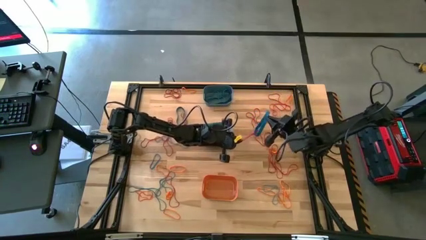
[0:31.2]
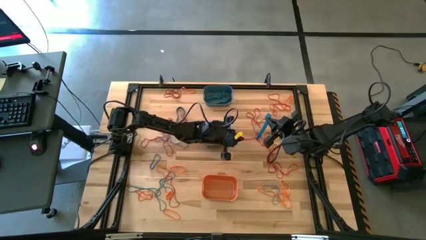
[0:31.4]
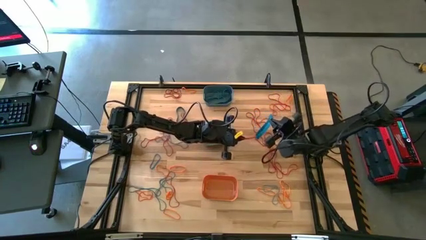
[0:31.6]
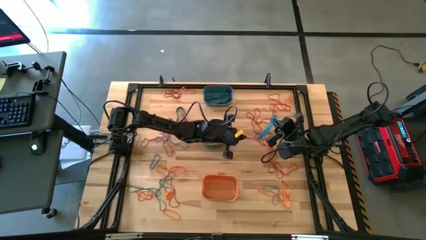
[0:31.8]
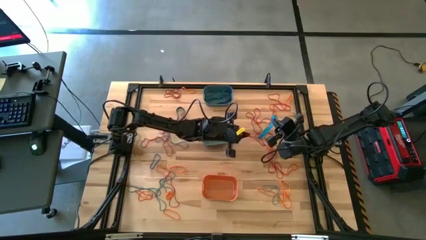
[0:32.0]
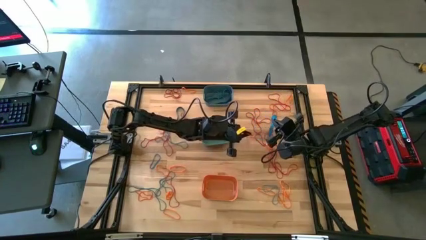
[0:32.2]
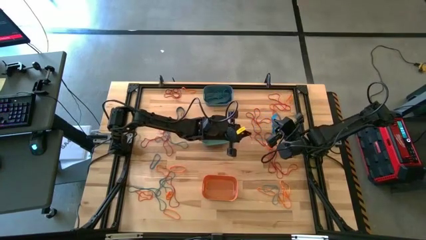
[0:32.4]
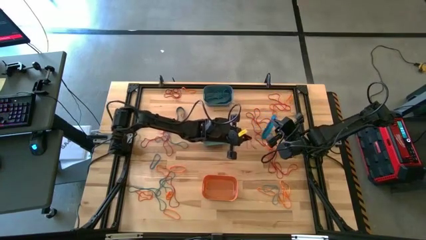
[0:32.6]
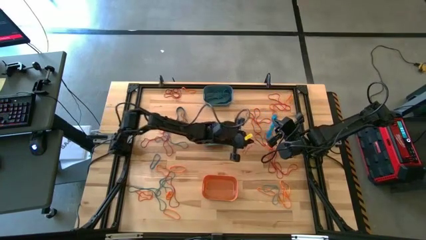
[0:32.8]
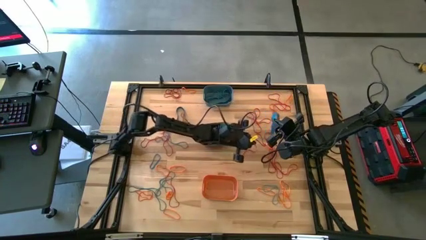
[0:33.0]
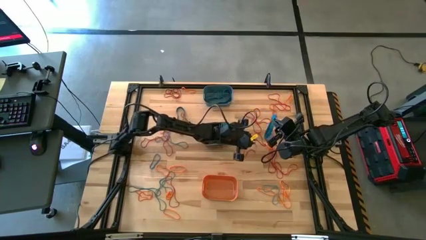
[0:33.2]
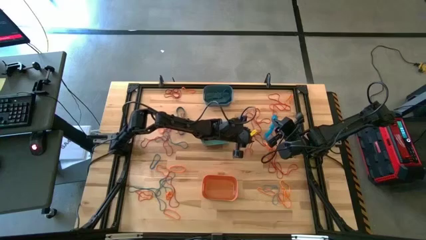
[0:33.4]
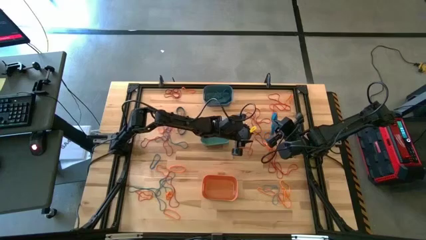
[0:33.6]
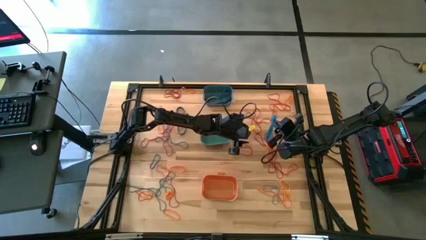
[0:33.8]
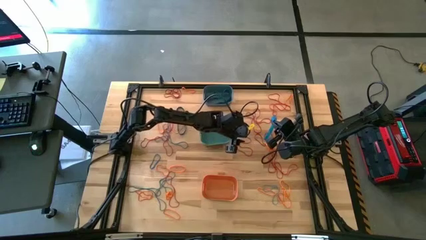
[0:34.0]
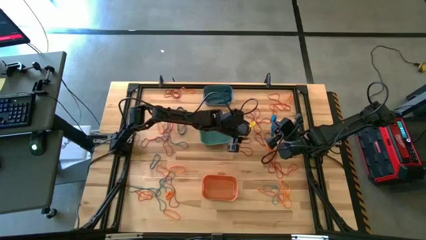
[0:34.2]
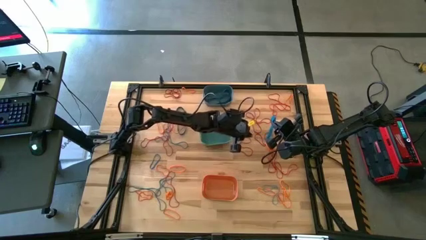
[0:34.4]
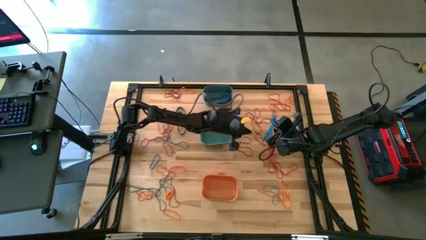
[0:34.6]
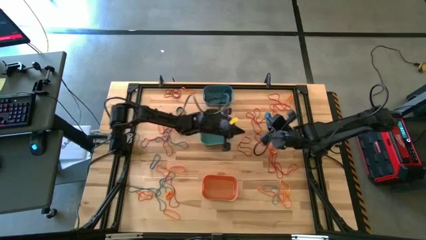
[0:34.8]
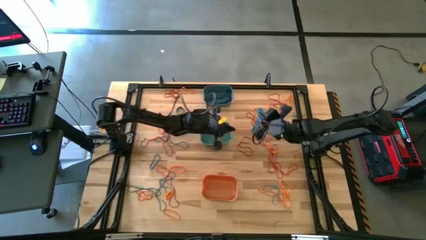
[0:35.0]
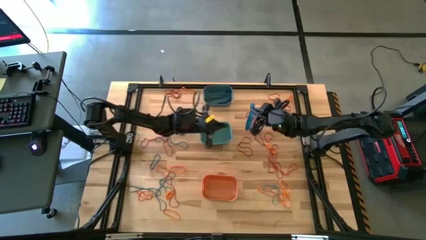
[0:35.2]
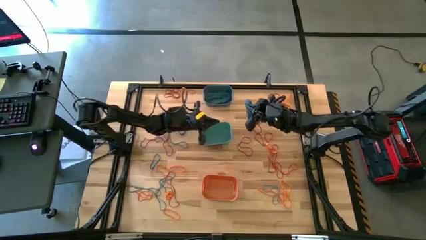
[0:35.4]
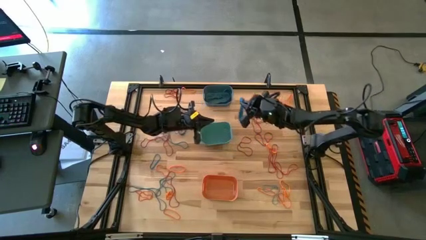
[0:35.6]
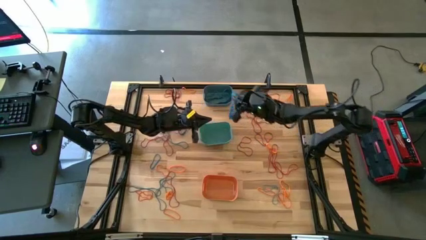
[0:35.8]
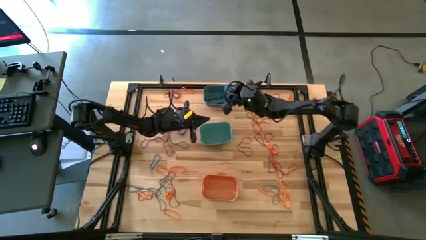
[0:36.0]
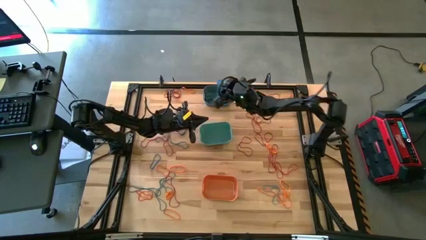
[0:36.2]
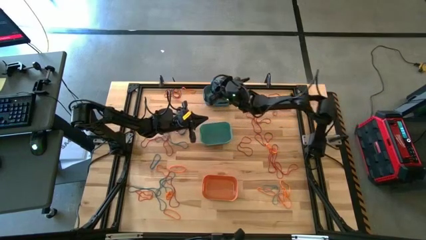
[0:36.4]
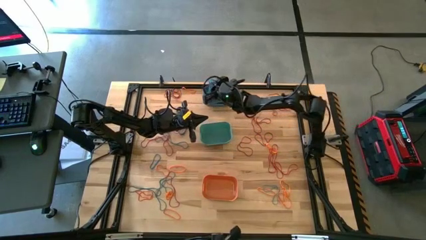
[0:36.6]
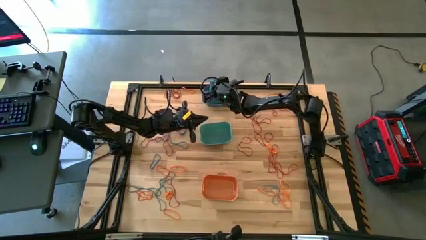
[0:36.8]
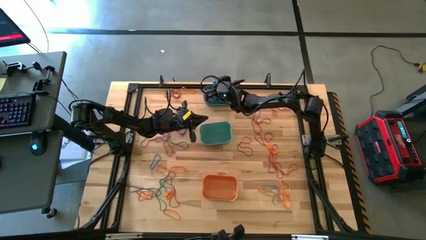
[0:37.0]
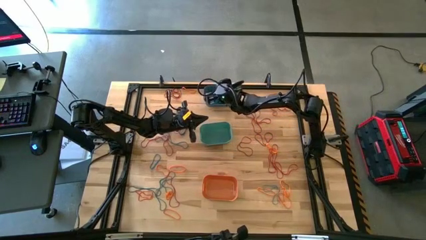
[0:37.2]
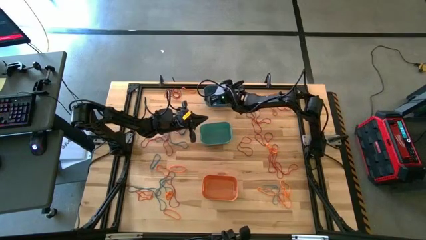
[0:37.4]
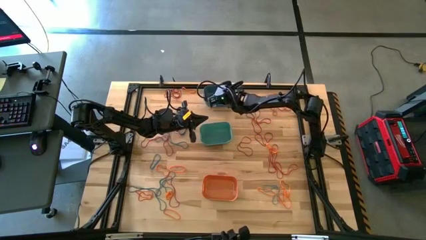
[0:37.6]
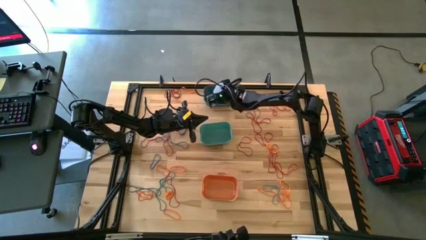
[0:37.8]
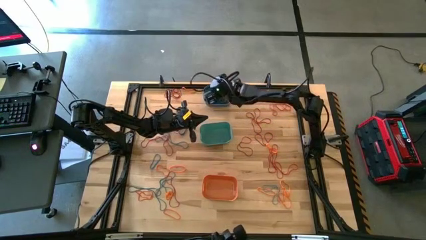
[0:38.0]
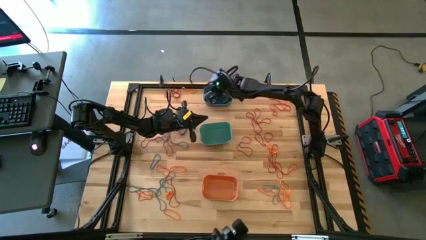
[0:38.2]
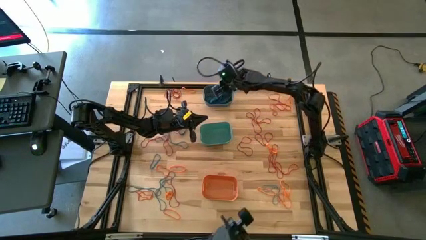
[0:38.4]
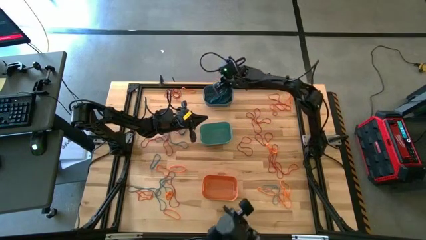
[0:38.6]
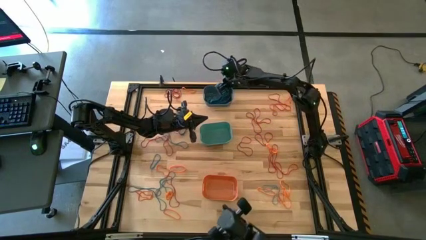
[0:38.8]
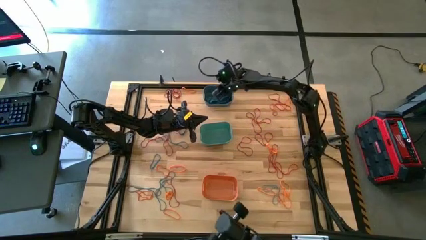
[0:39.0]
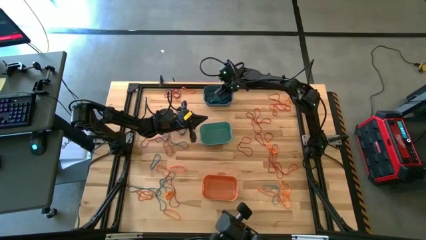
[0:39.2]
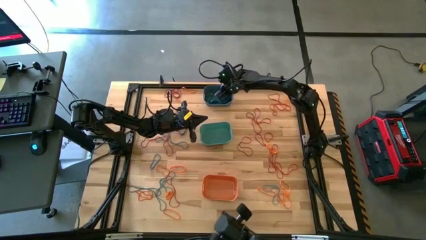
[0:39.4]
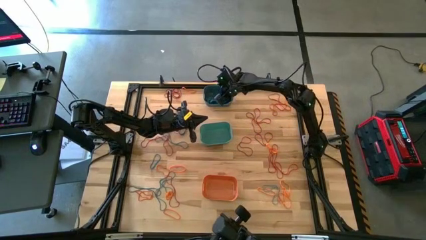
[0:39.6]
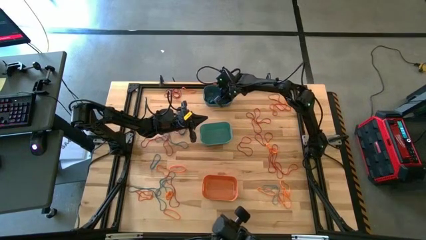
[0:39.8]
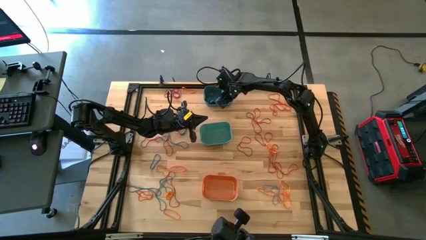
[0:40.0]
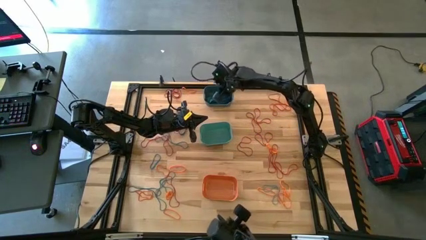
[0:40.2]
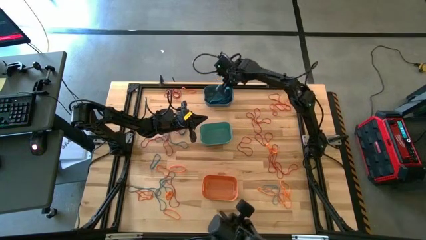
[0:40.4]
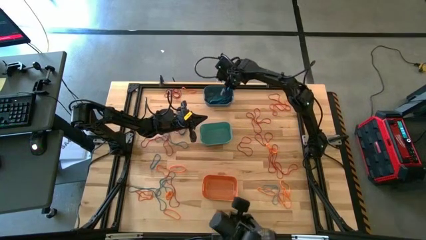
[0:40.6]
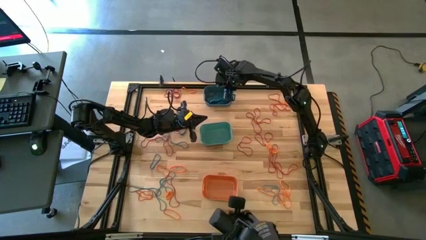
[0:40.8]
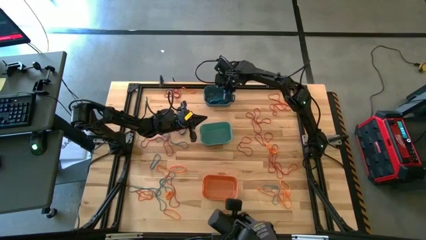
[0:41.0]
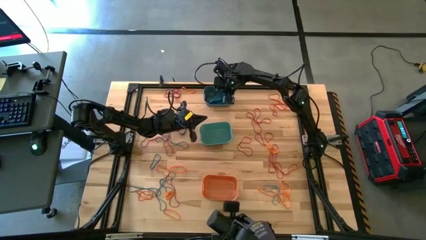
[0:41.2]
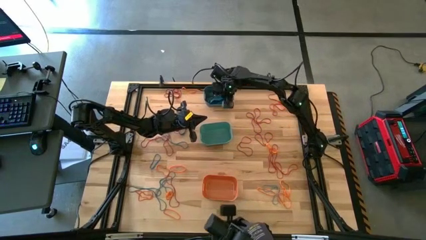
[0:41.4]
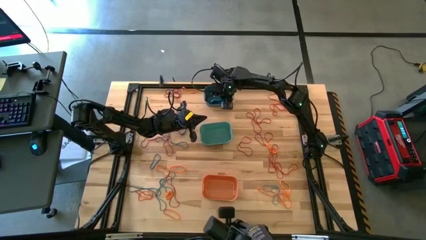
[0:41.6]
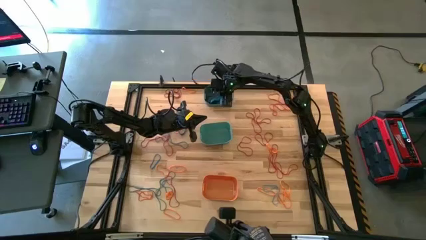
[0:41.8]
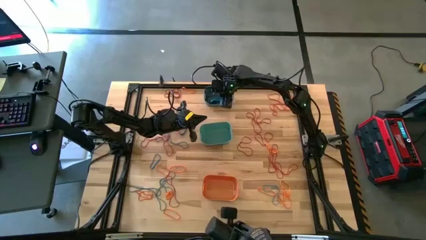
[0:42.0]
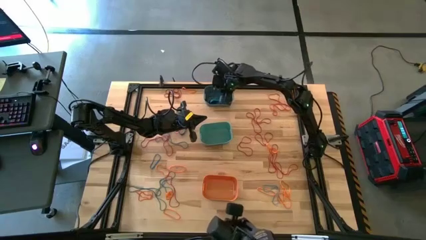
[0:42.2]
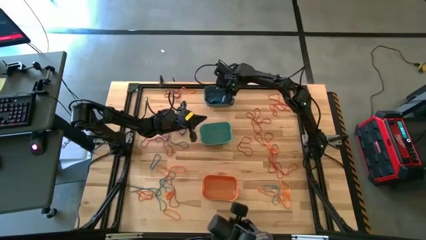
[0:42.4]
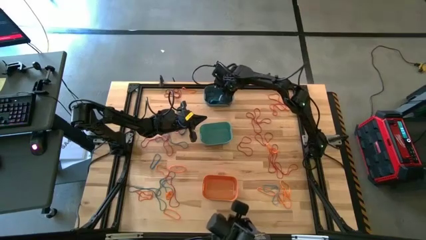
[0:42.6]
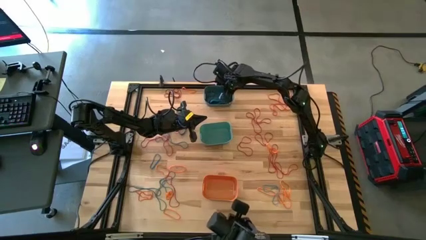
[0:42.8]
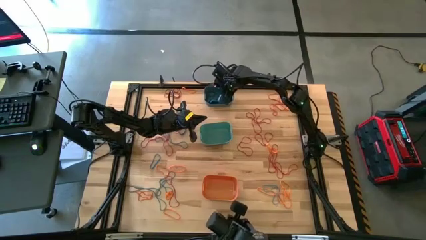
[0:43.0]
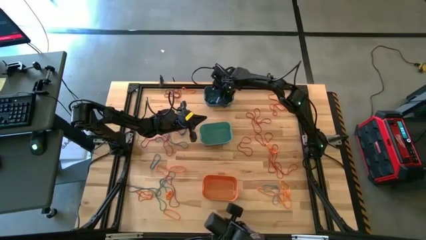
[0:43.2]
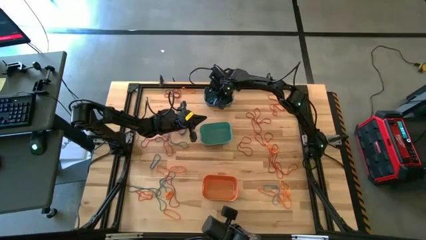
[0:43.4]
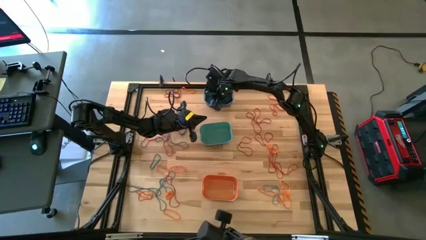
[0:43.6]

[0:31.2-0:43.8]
Task: Sort rubber bands into baskets
Put the blue rubber band into the blue bin

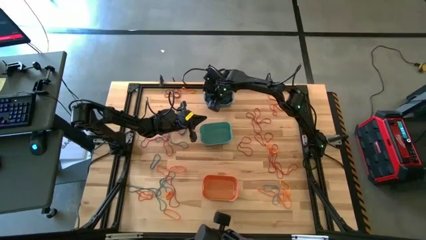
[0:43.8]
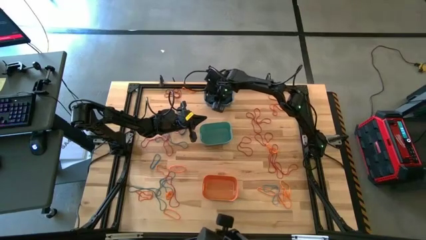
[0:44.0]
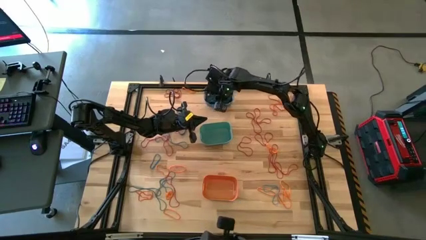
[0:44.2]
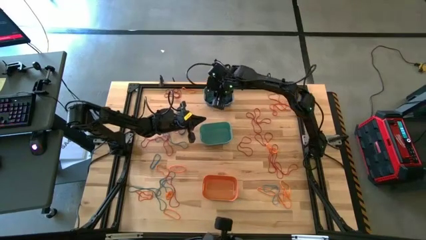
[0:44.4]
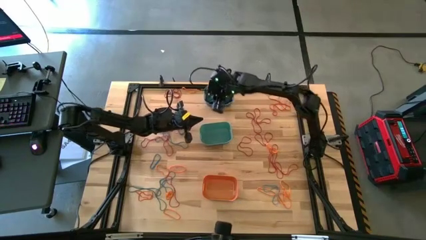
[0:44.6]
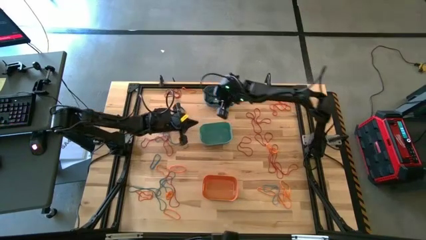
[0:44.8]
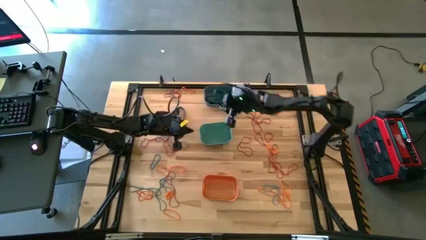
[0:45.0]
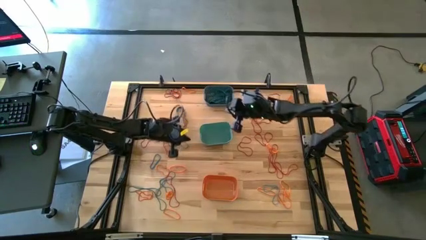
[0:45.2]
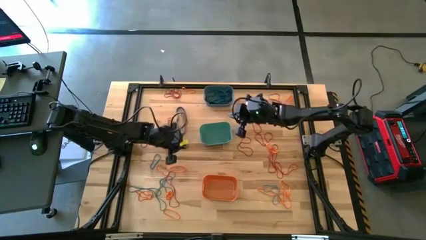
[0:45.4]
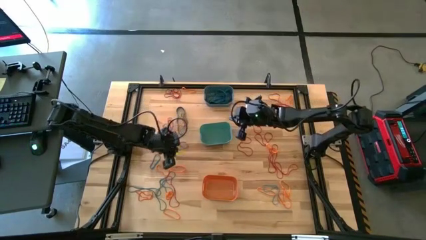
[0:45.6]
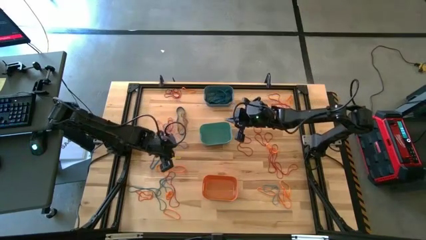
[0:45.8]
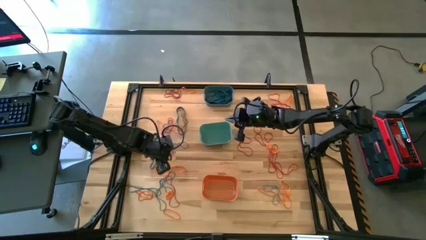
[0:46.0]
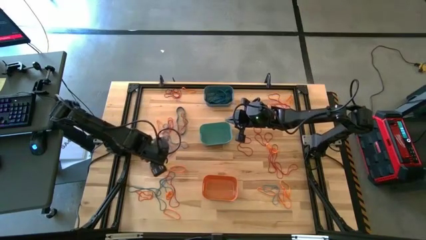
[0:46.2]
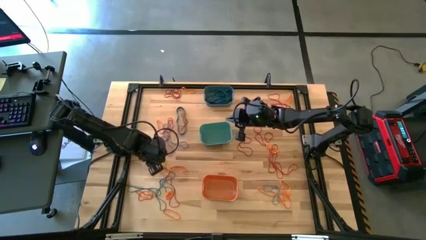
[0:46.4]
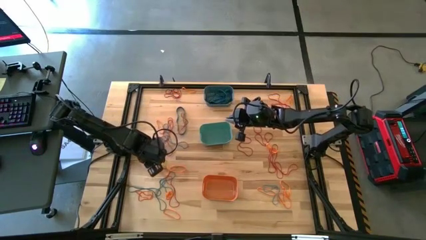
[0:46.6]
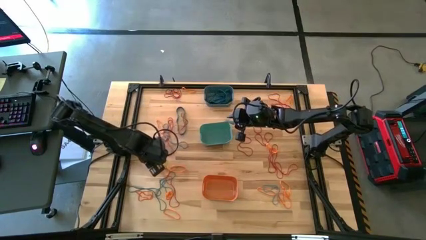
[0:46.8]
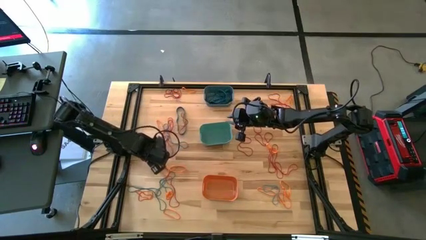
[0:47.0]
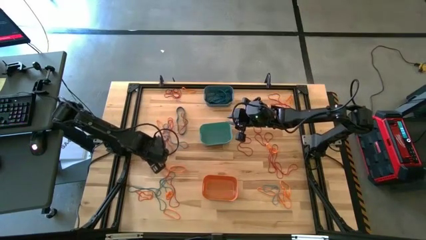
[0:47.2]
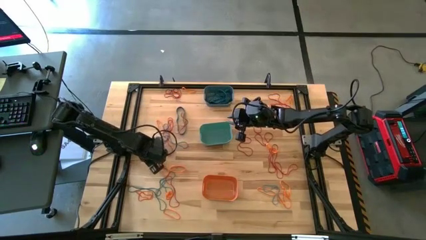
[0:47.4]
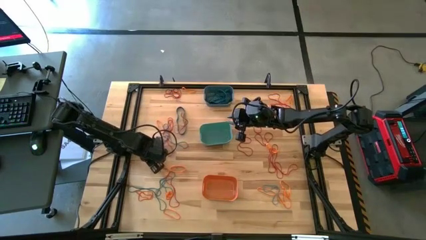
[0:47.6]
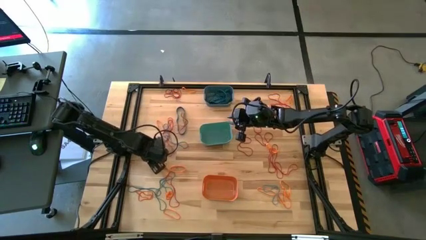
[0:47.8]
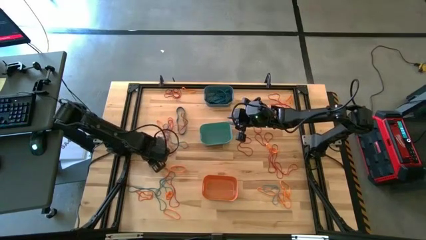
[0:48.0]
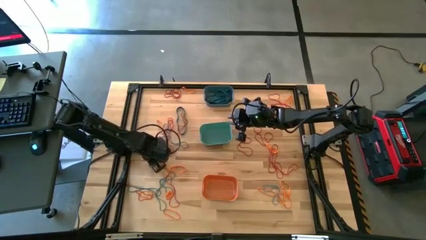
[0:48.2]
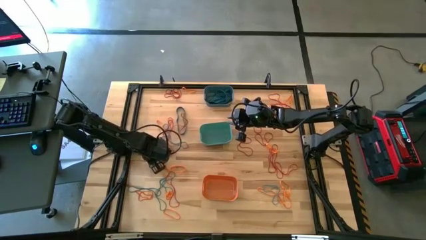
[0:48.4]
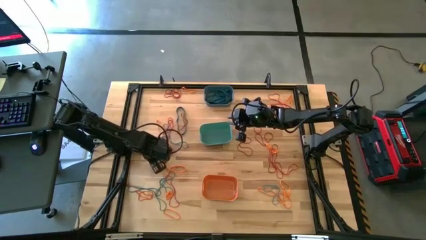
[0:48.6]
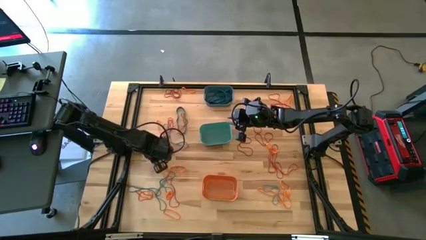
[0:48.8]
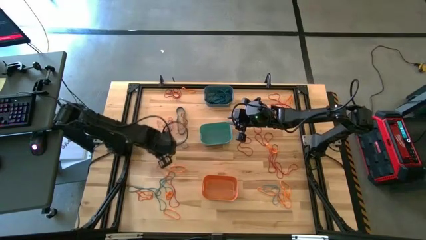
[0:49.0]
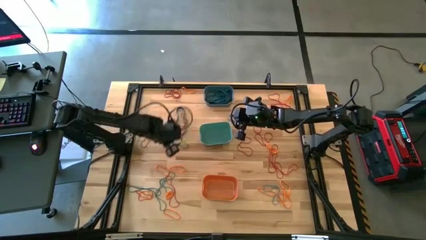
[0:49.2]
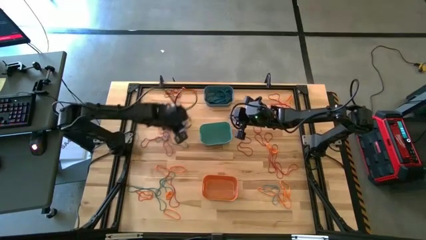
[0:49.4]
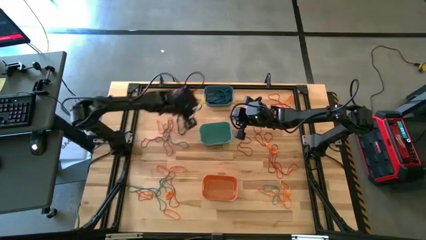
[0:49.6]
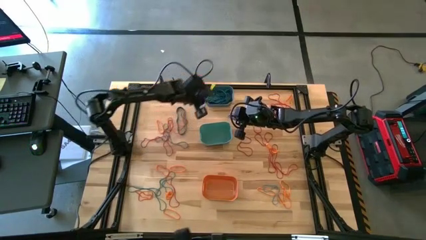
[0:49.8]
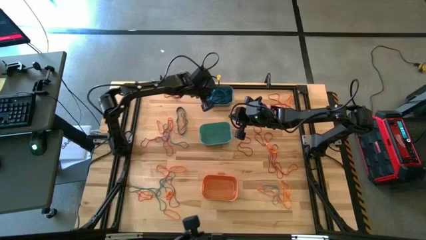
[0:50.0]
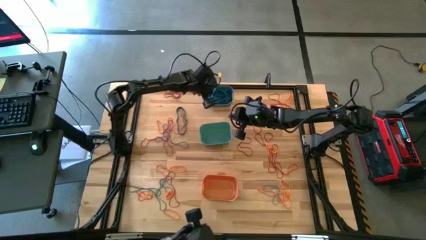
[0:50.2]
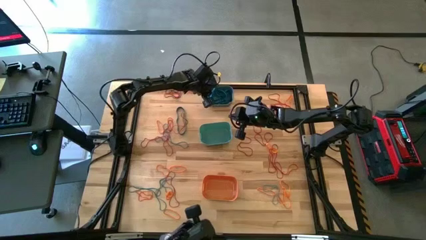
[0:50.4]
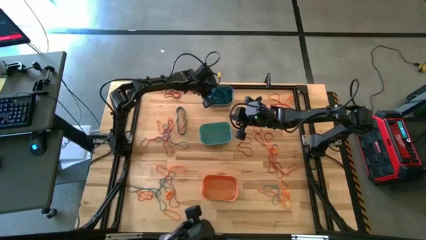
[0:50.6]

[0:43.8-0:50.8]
Put the blue rubber band into the blue bin
